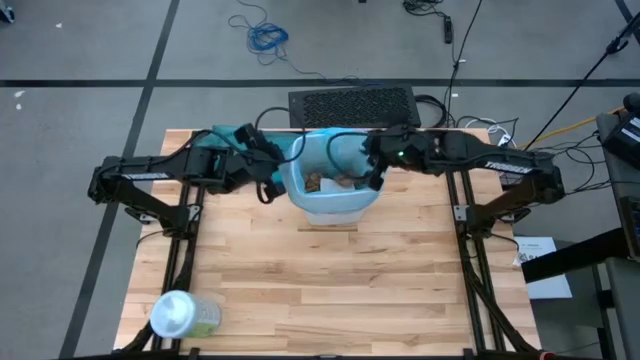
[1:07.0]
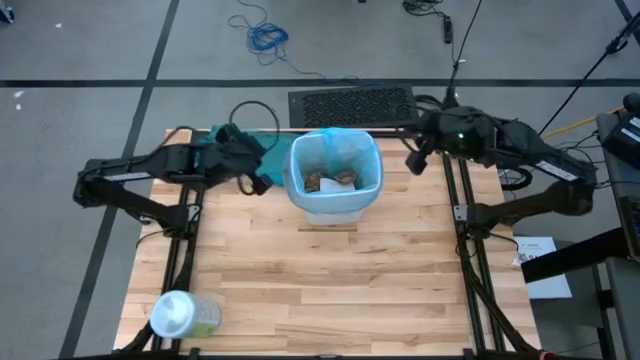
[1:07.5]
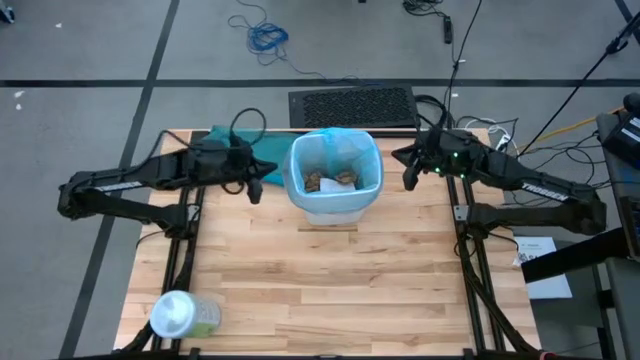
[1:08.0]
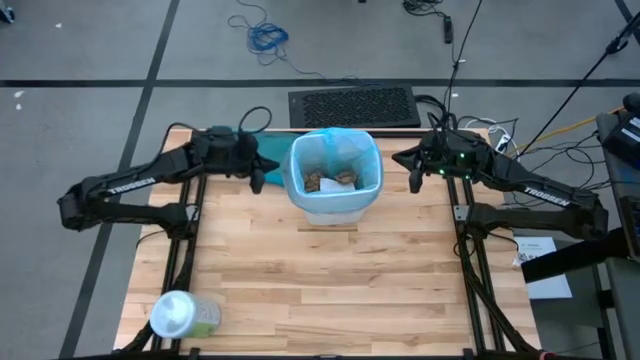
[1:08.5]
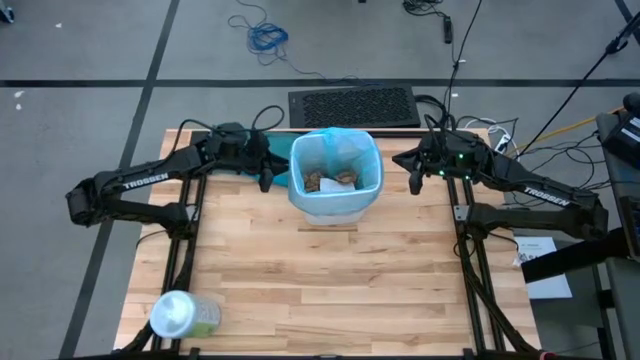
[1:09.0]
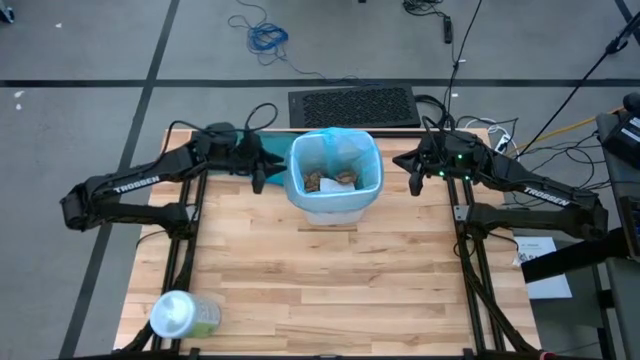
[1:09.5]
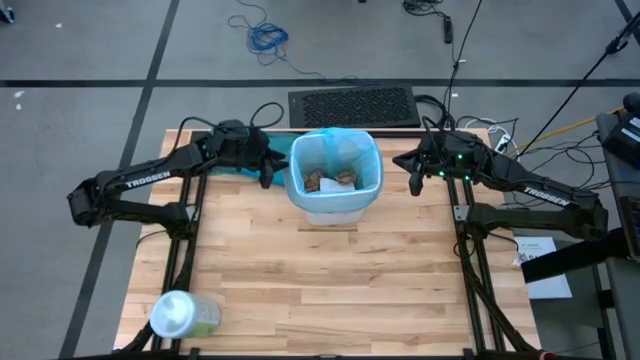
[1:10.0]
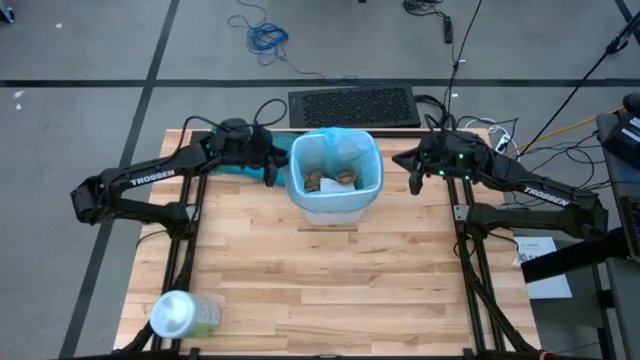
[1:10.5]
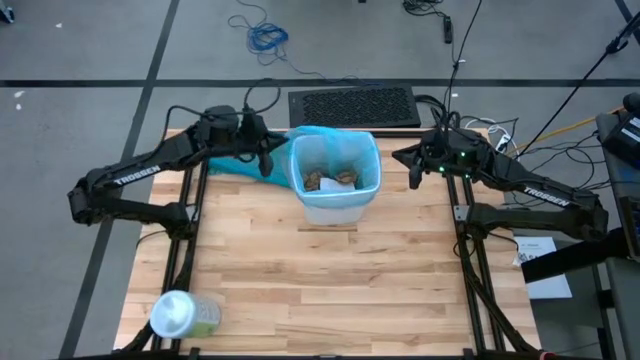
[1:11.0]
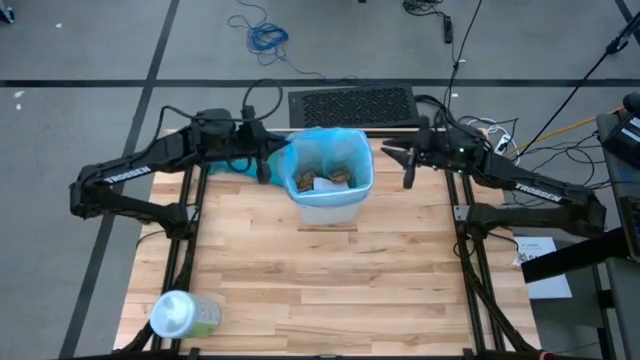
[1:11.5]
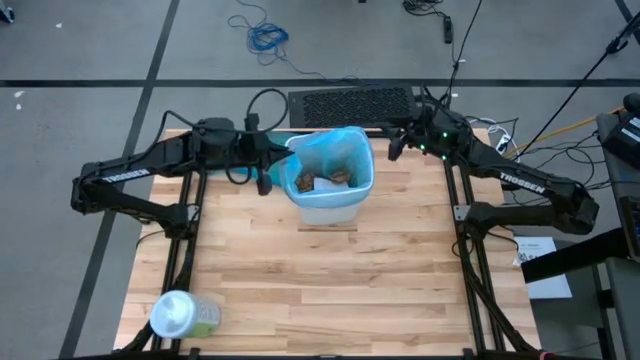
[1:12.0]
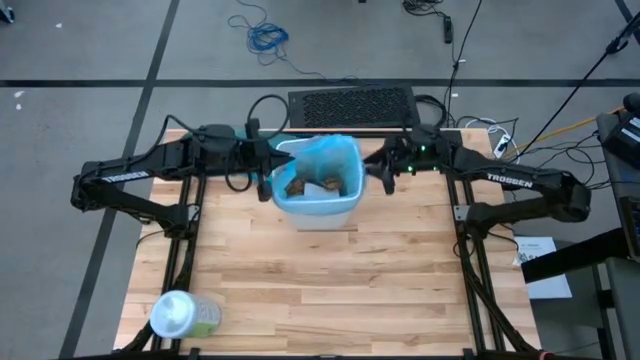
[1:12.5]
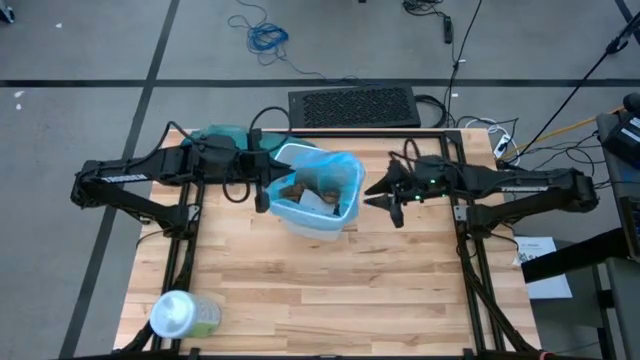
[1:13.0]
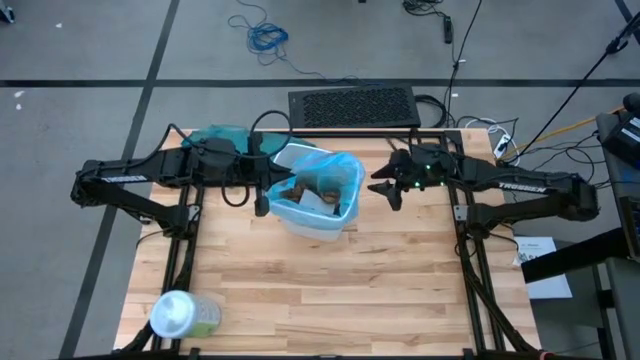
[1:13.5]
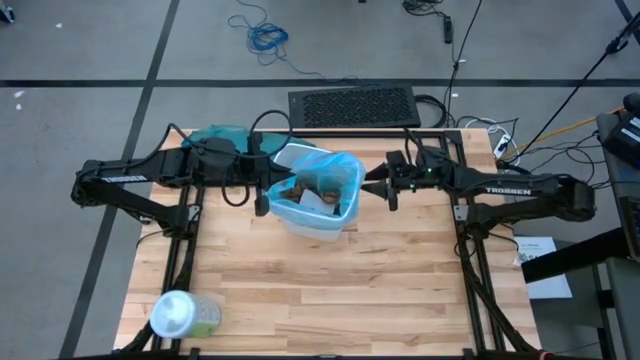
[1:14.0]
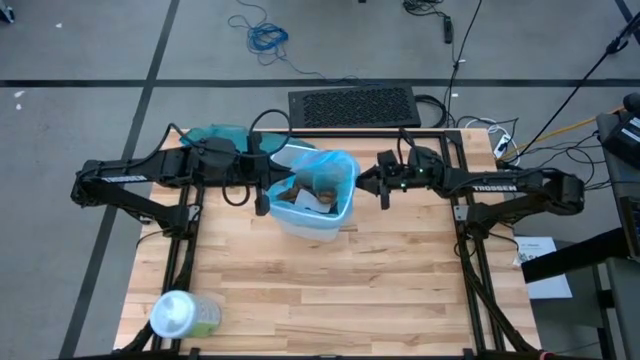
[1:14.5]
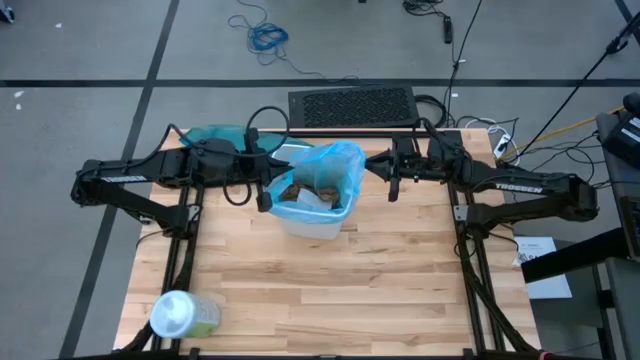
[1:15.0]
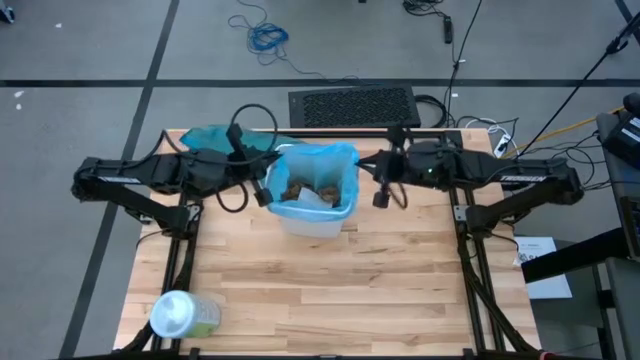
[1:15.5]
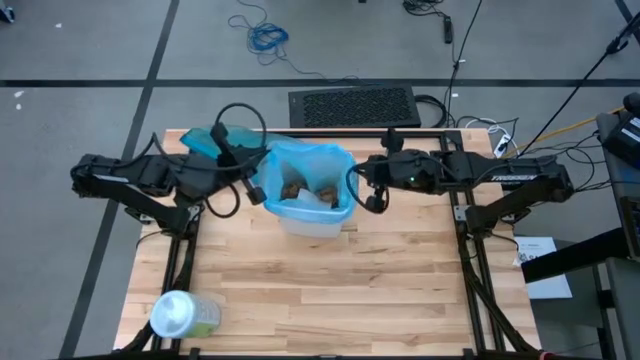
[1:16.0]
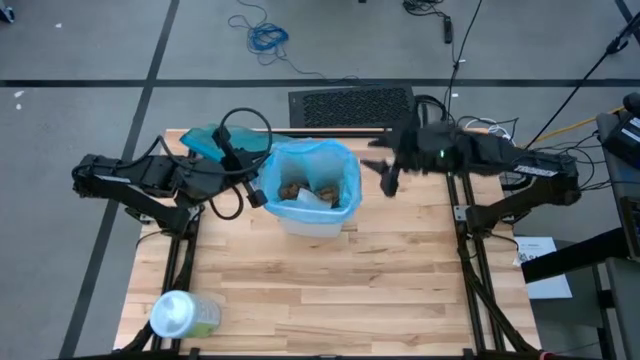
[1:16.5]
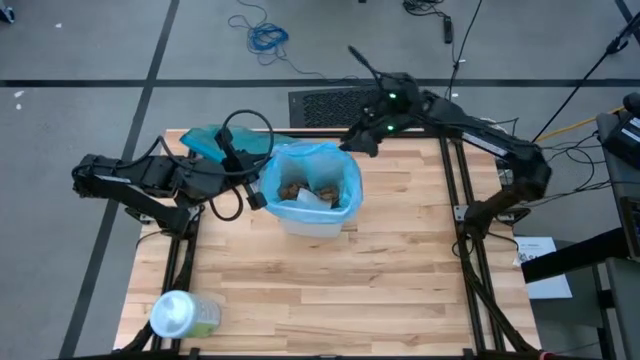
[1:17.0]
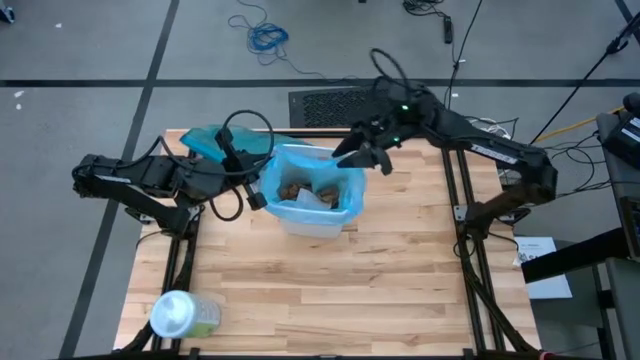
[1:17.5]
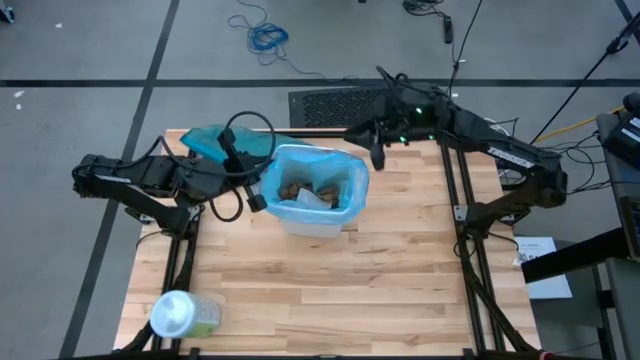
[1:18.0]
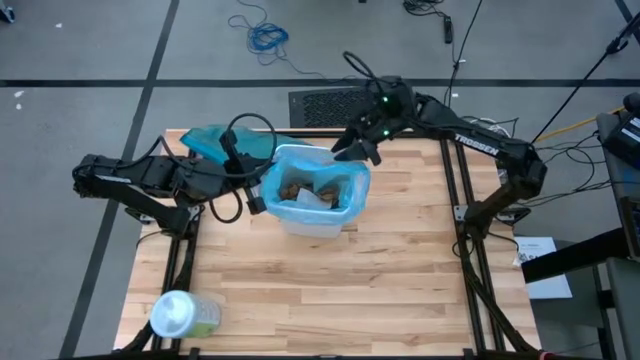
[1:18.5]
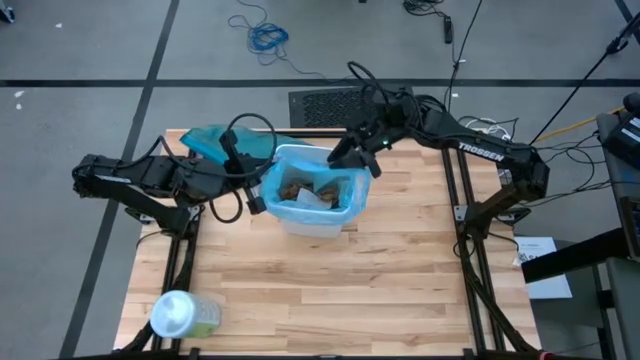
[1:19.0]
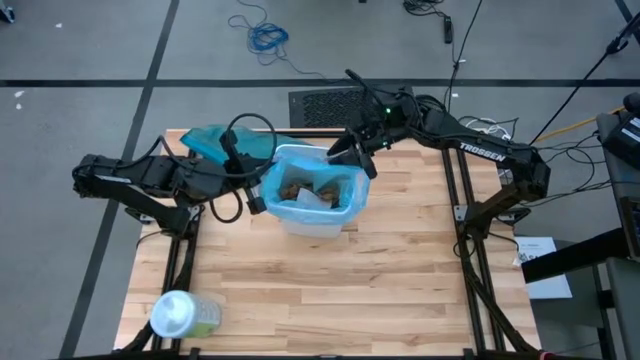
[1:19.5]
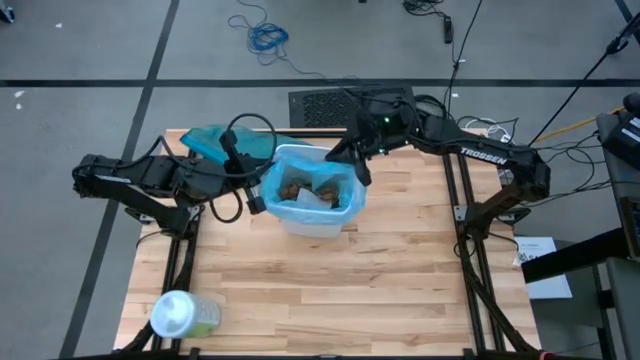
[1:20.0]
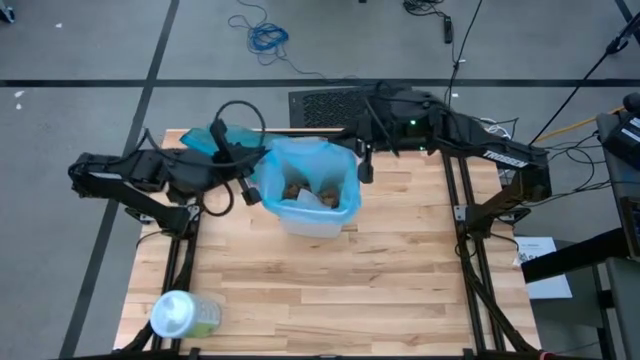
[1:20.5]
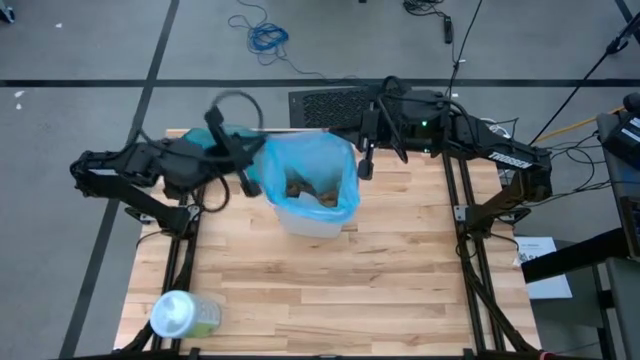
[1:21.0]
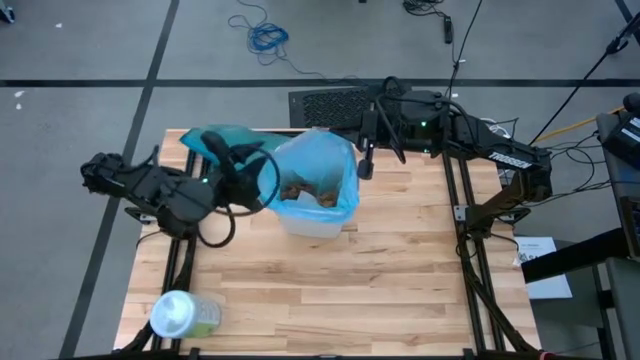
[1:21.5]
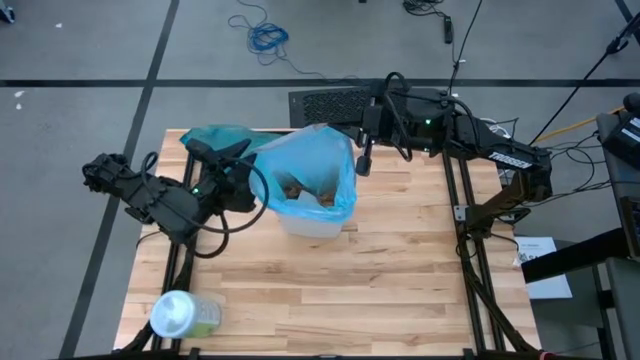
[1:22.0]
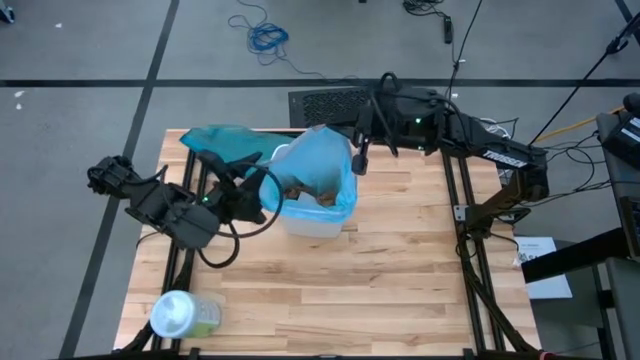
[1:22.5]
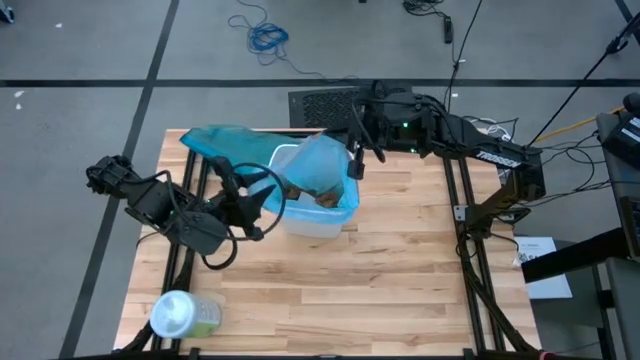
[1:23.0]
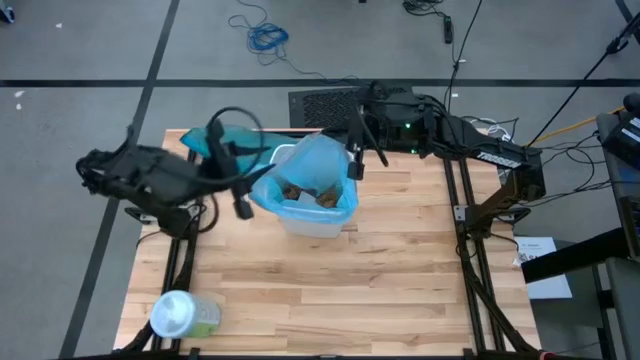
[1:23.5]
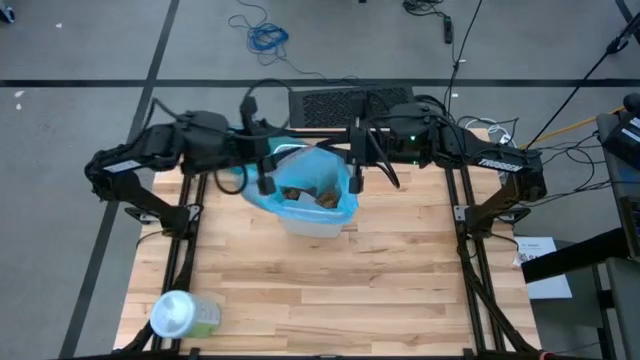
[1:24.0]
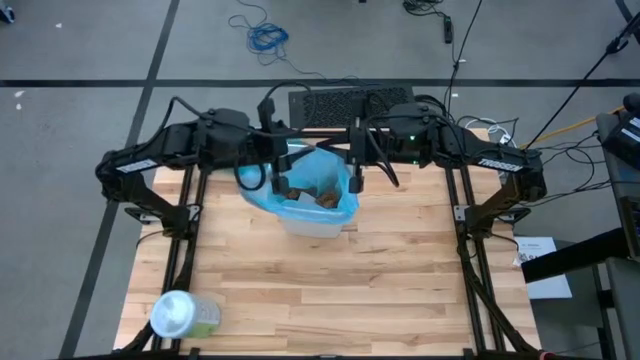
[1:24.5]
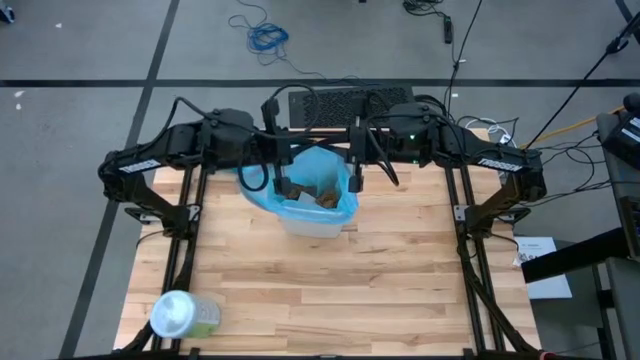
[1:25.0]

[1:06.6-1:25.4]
Task: place trash/remove bag and relplace
Close the light blue trash bag

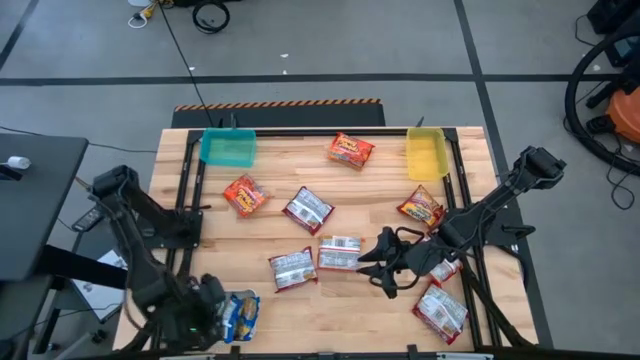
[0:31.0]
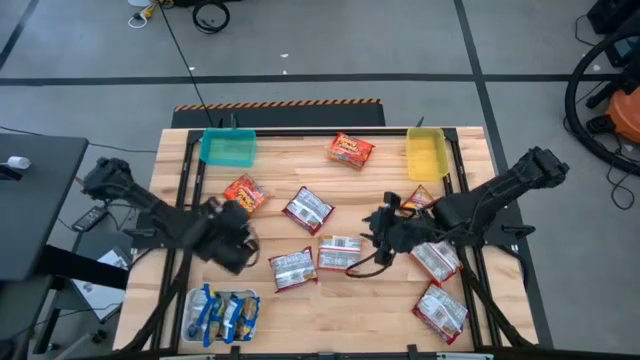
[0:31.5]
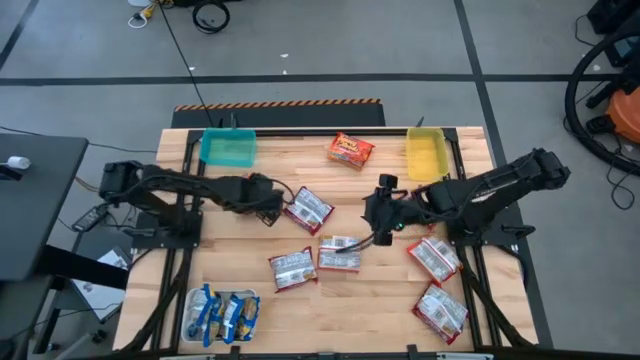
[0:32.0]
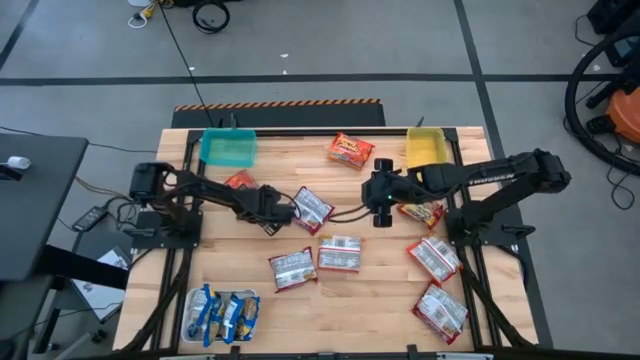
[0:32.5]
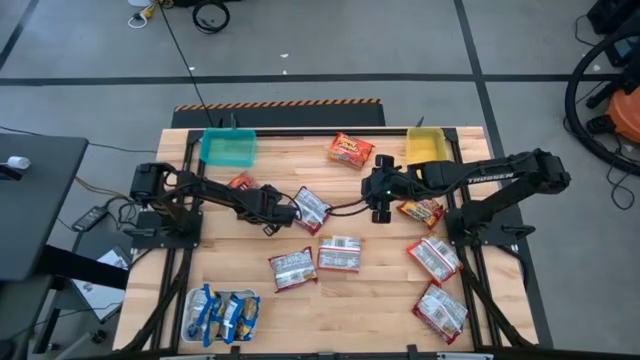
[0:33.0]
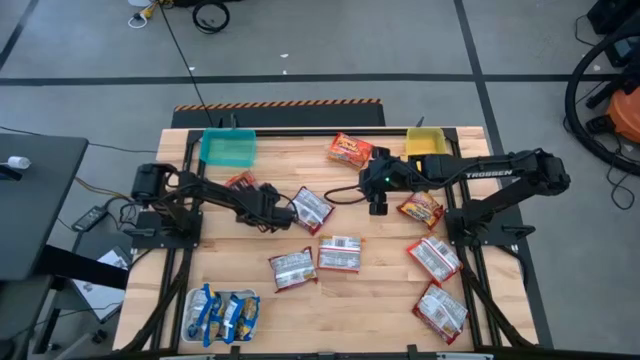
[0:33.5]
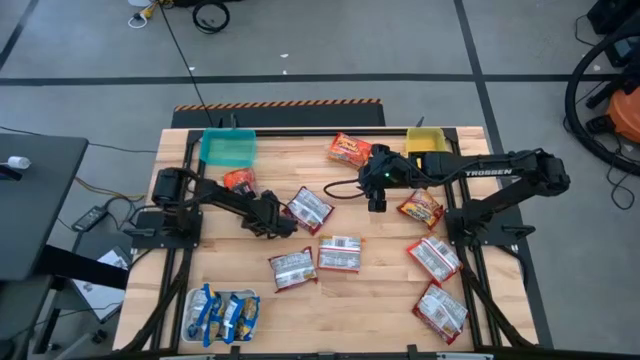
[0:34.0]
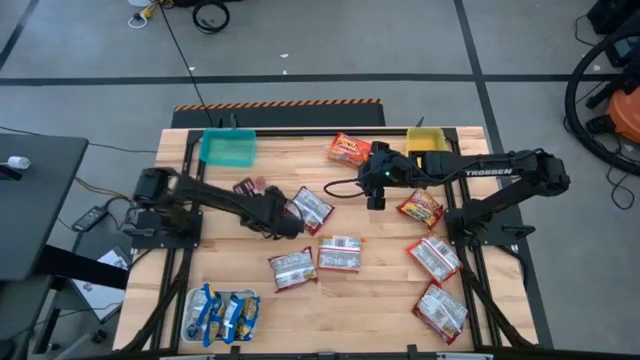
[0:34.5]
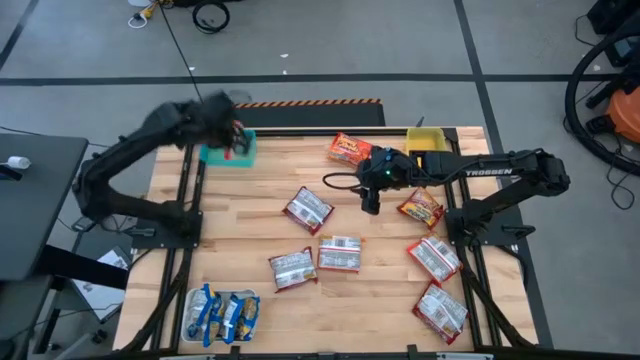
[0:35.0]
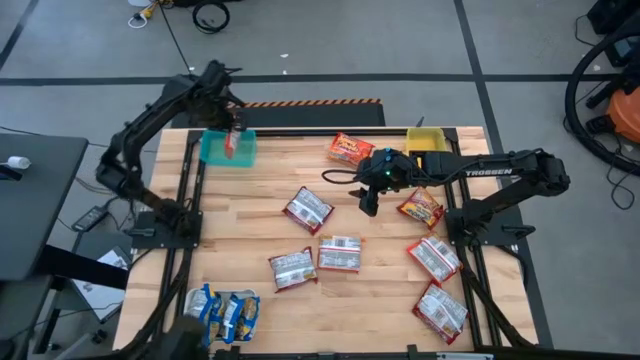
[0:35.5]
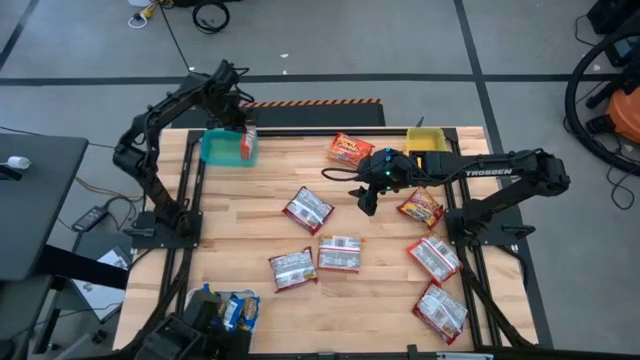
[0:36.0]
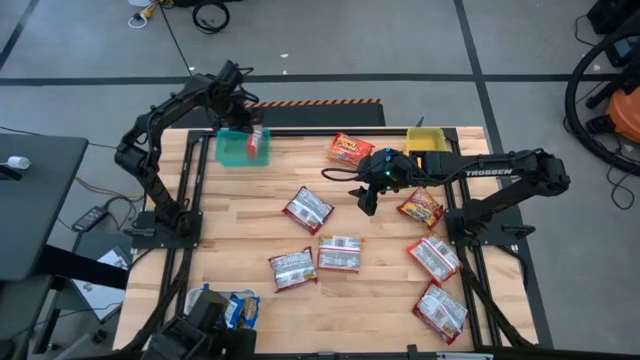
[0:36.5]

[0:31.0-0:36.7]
Task: Sort Maruchan noodles
Put the orange noodle pack into the green bin
